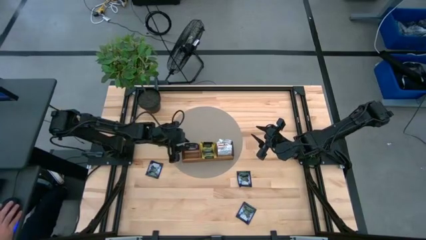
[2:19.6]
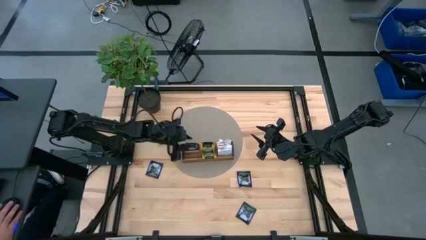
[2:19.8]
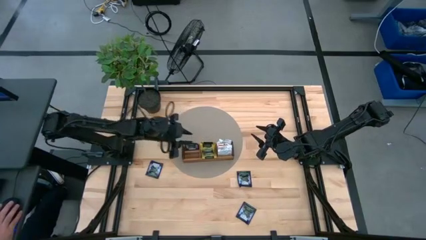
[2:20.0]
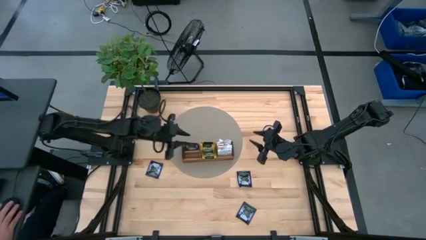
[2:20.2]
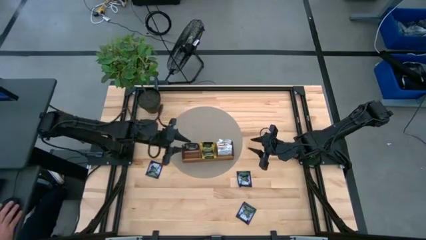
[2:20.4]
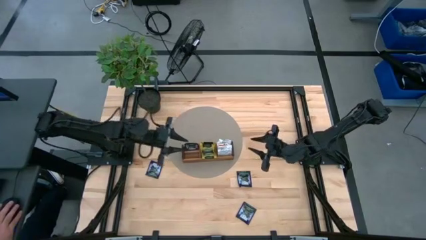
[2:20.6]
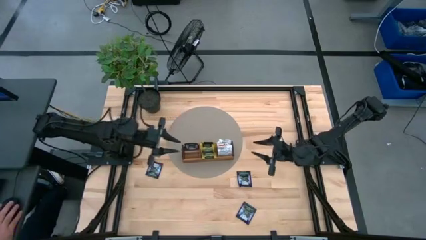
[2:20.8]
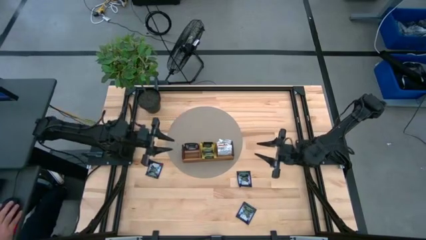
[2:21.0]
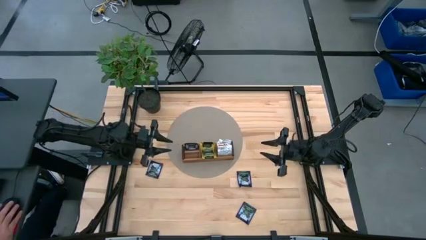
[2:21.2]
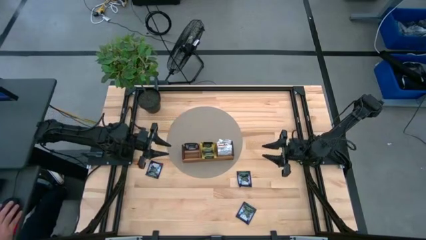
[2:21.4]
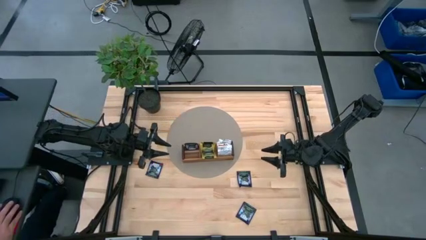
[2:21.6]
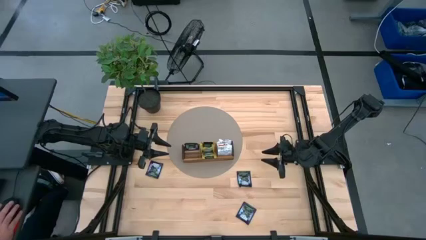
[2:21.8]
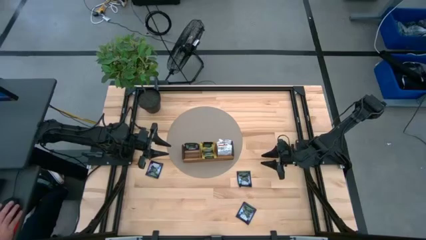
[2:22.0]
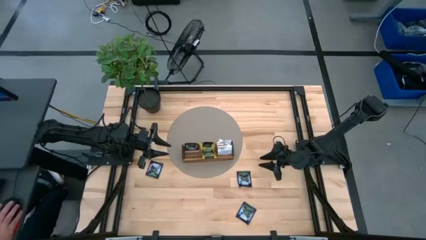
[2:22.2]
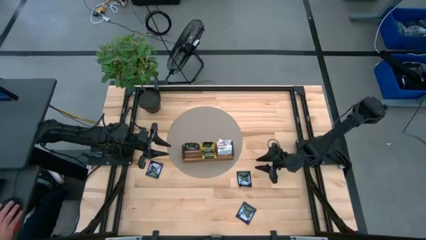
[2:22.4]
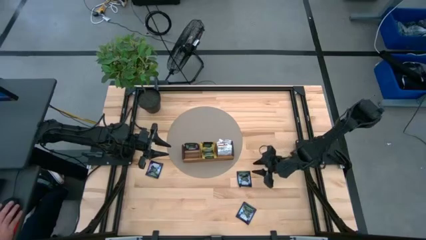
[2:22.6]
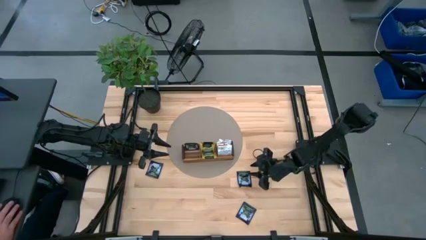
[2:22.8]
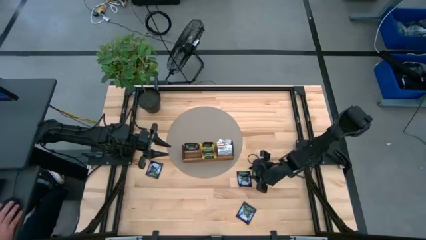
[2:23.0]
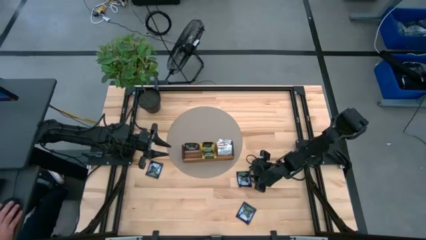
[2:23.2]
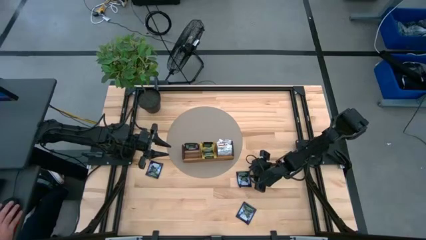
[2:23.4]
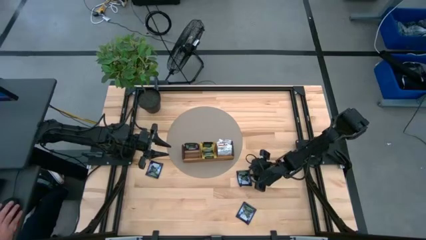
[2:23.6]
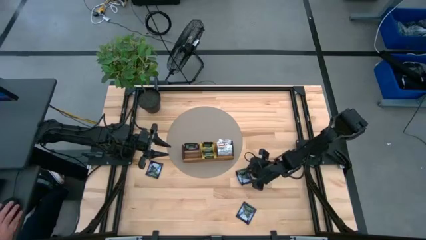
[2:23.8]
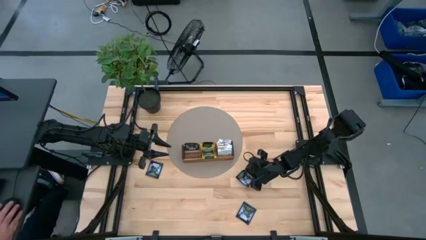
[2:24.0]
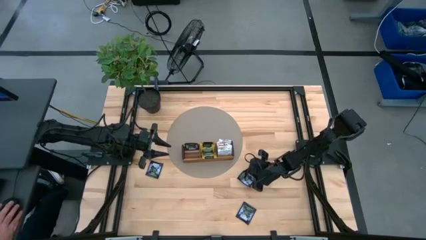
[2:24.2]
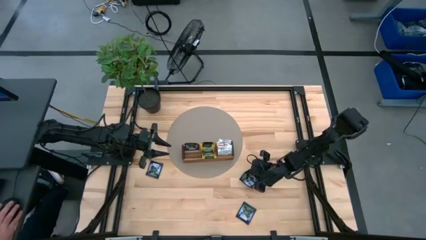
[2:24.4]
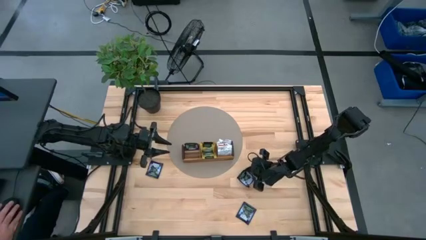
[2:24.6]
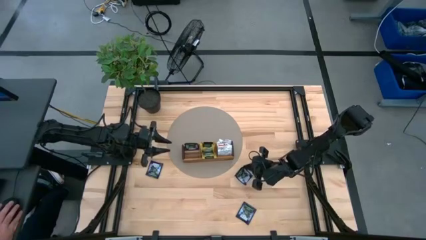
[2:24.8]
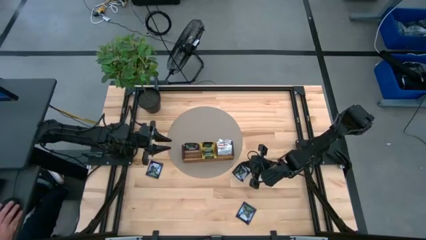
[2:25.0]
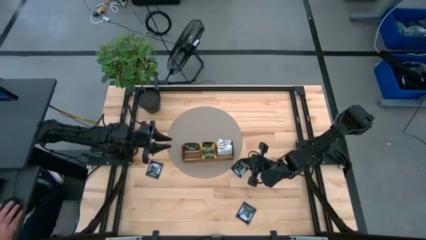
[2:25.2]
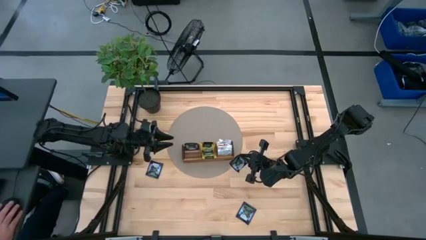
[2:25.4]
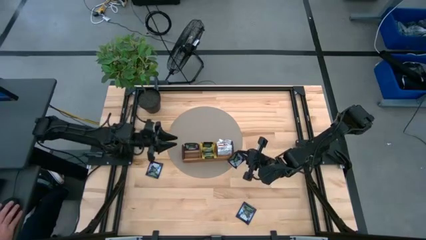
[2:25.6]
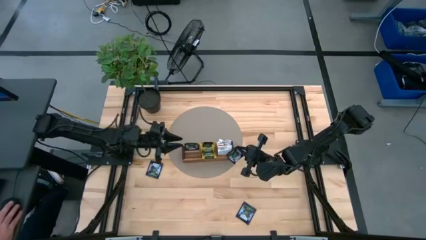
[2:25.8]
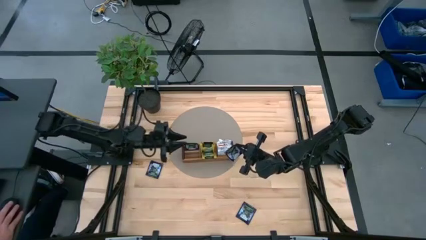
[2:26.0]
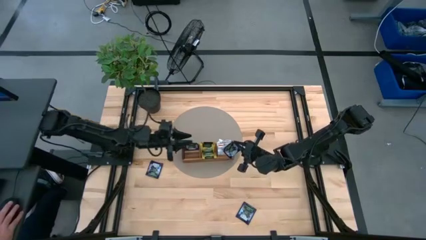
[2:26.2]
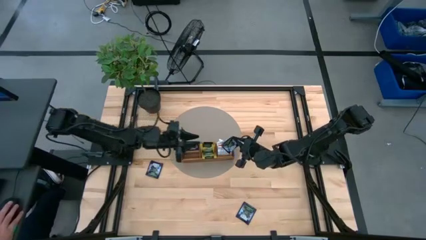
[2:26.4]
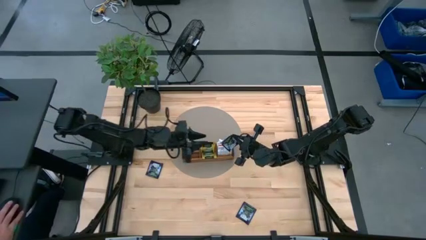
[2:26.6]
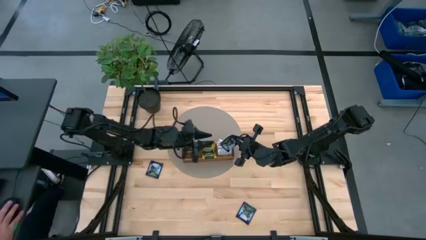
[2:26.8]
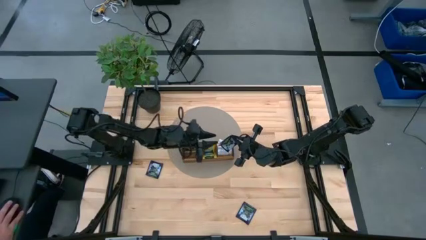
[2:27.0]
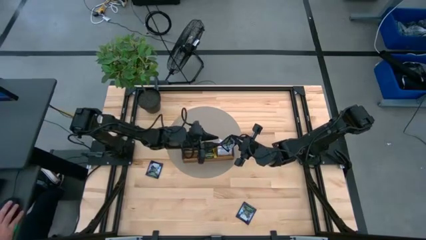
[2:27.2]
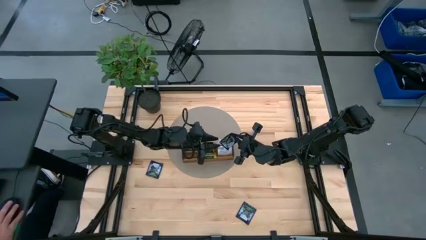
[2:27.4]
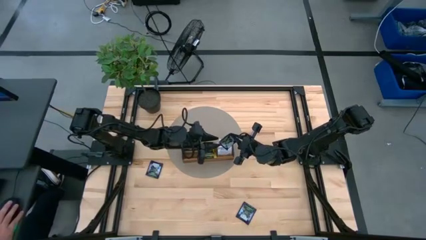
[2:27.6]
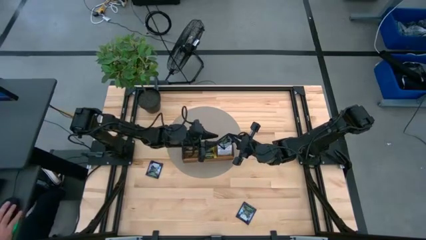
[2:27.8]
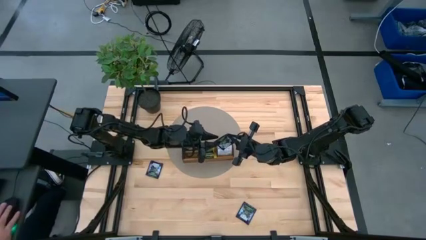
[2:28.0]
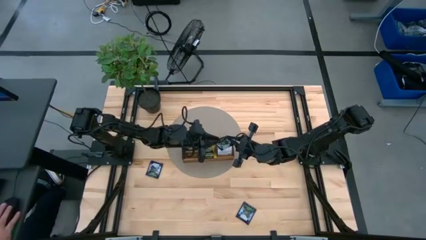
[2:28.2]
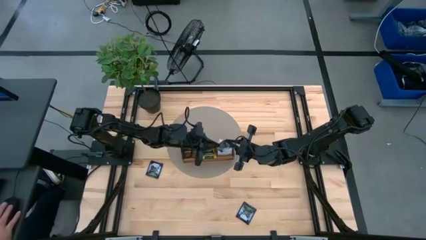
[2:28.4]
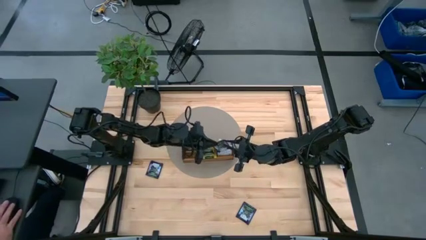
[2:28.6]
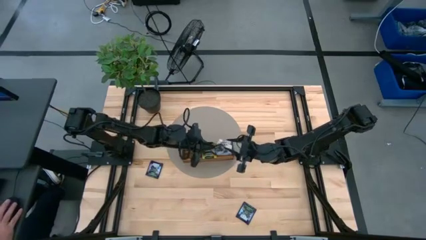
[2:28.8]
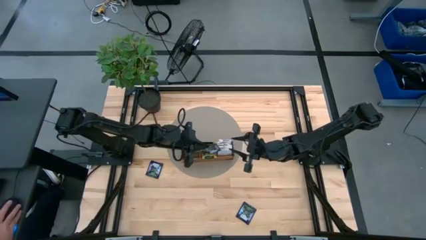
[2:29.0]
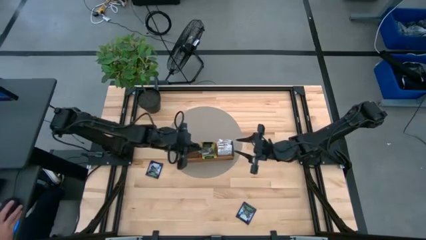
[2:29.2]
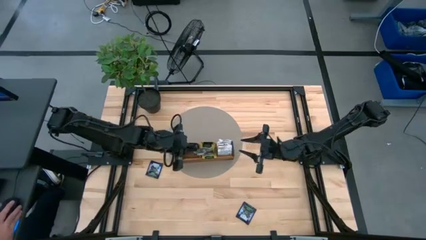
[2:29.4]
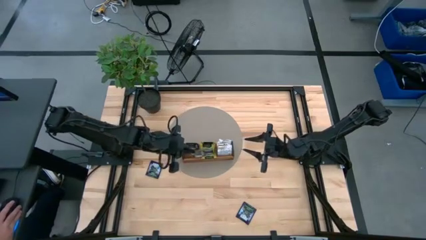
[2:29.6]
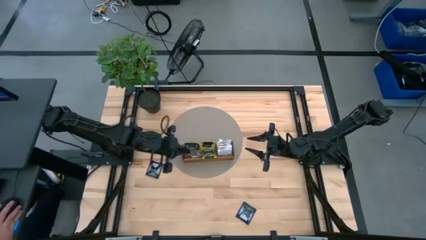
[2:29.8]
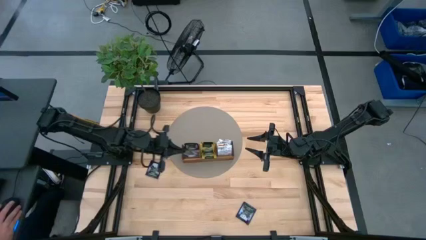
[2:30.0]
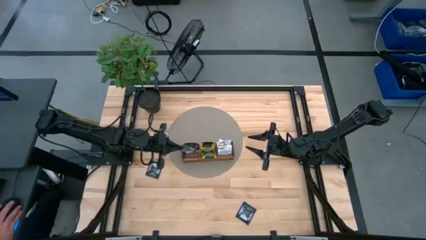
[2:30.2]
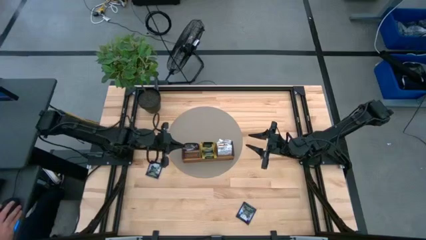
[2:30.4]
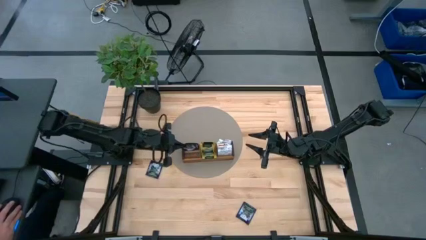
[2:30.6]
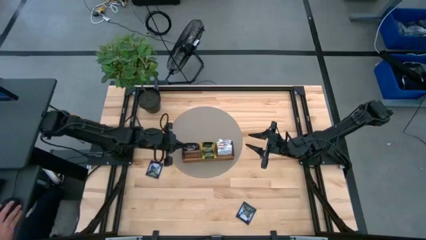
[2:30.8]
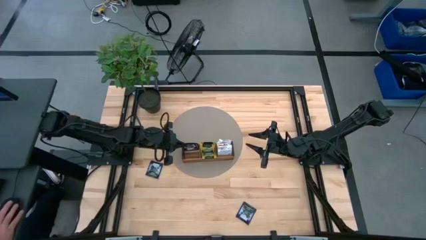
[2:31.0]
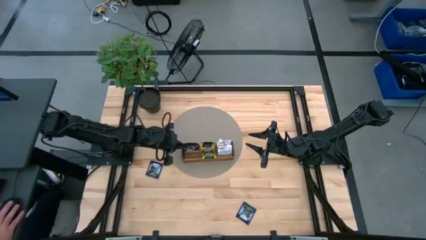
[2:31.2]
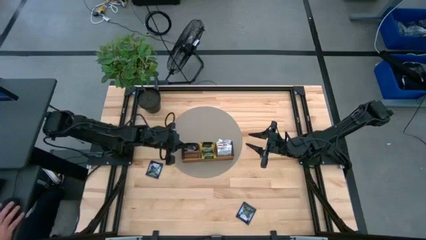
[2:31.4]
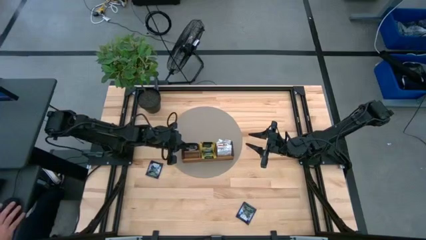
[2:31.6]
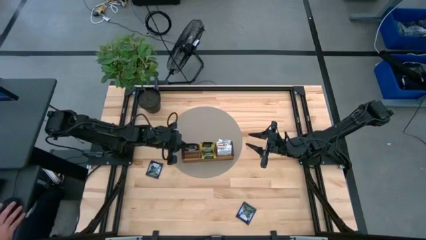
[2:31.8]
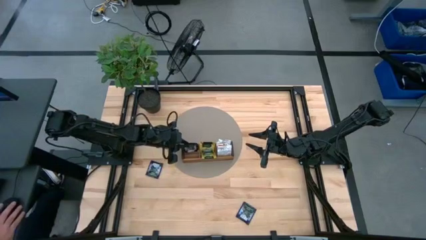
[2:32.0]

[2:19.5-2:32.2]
Task: Pick & Place Tea
Put the purple tea bag into the left section of the wooden organizer

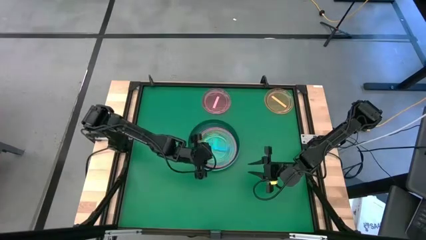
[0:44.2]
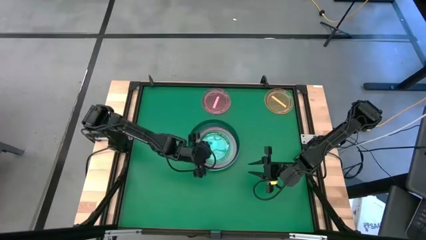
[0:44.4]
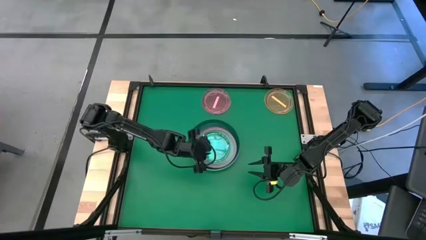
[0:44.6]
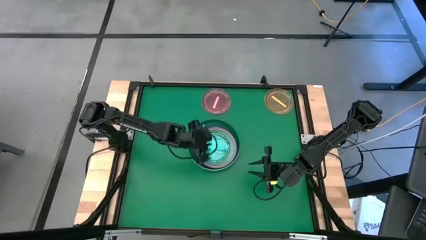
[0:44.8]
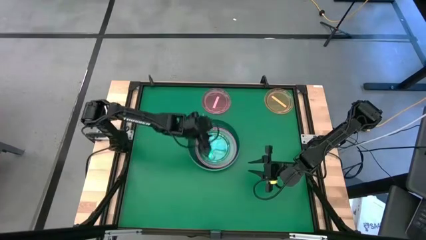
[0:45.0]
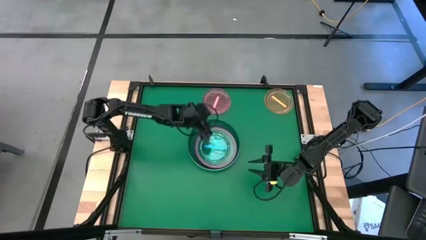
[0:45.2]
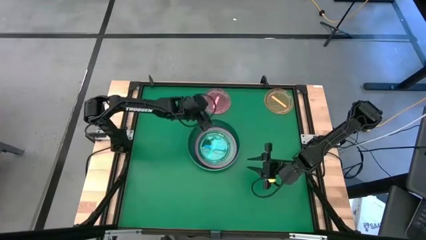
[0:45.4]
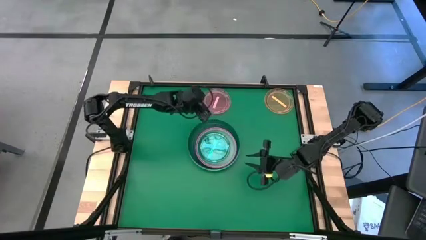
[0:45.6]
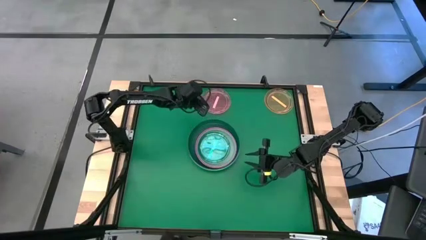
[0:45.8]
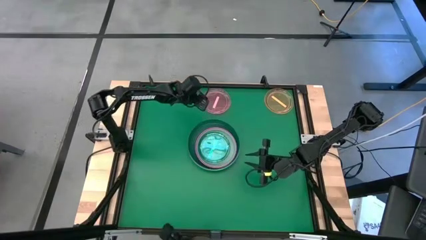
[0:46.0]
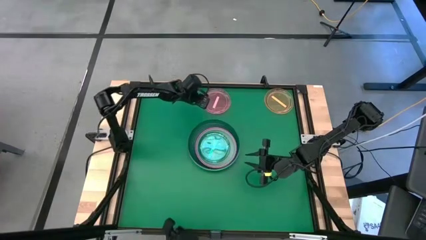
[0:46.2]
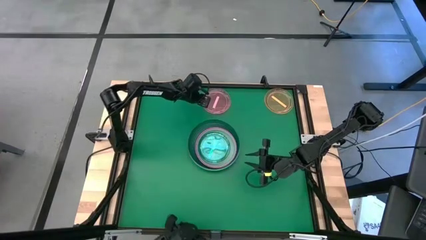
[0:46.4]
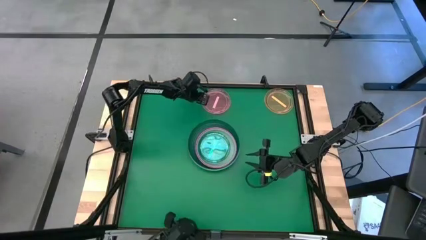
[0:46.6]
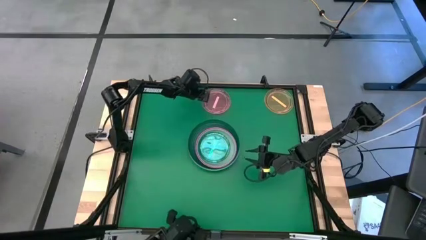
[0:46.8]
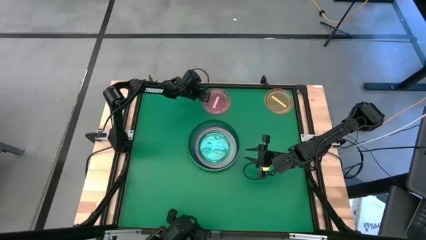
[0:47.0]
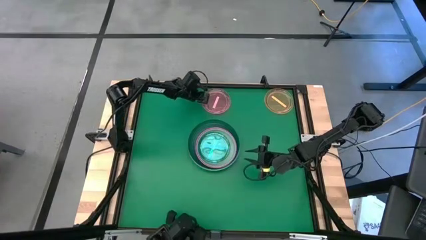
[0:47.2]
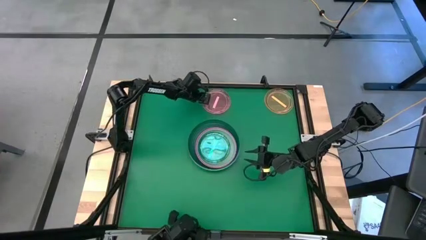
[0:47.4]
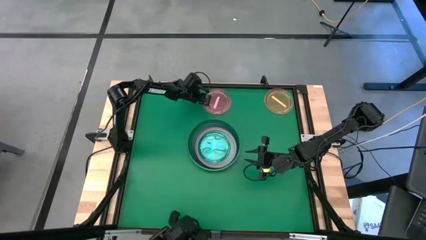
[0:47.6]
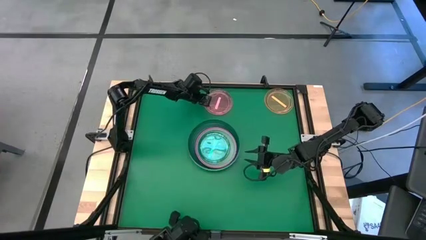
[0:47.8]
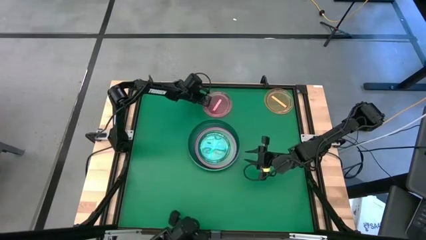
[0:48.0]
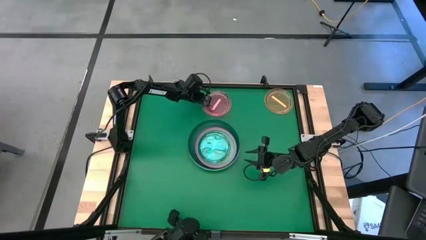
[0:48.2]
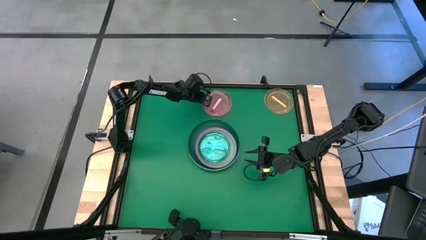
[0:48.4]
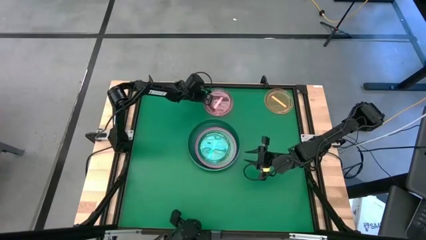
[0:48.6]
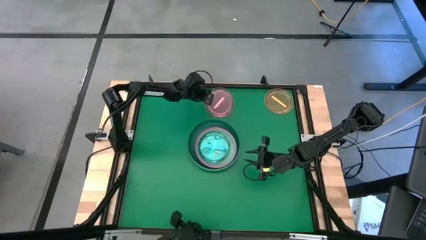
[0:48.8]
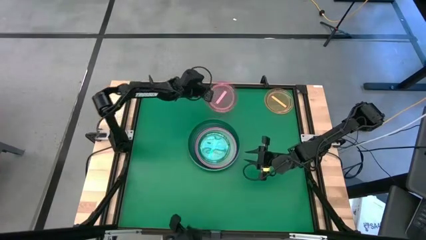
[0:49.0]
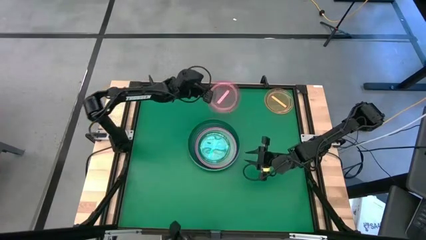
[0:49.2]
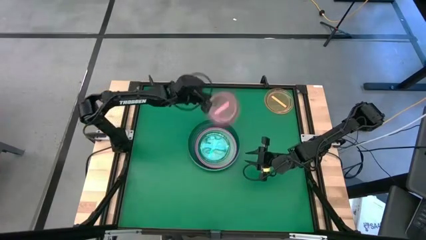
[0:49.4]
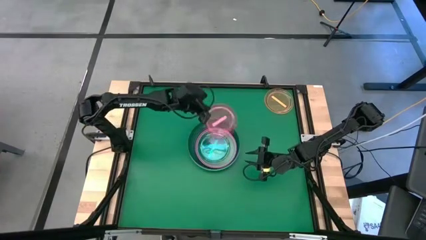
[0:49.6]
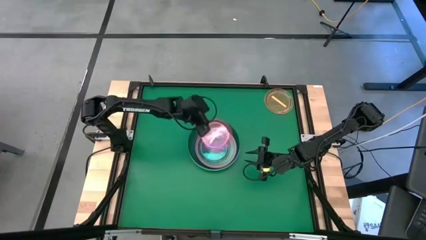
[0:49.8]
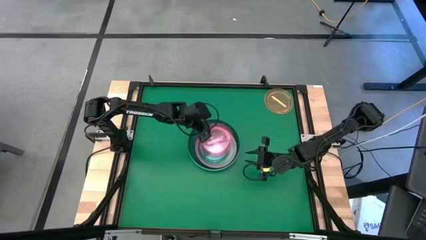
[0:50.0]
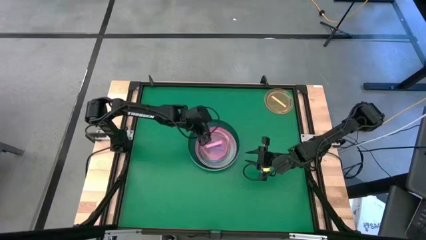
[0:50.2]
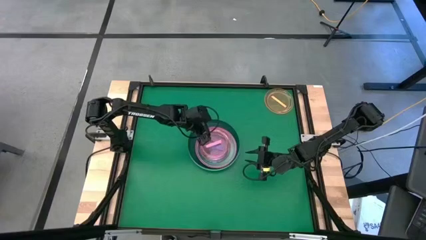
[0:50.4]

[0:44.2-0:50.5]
Task: Stack plastic plates
Stack the pink plate on top of the blue plate
